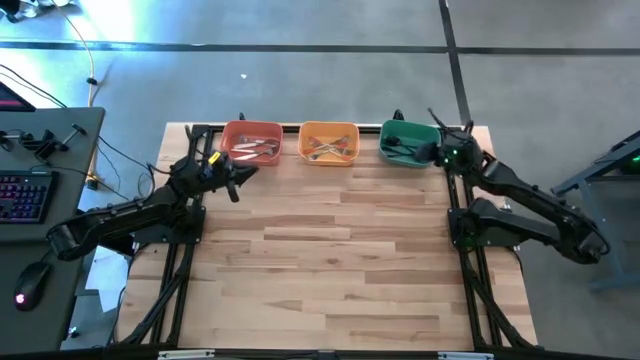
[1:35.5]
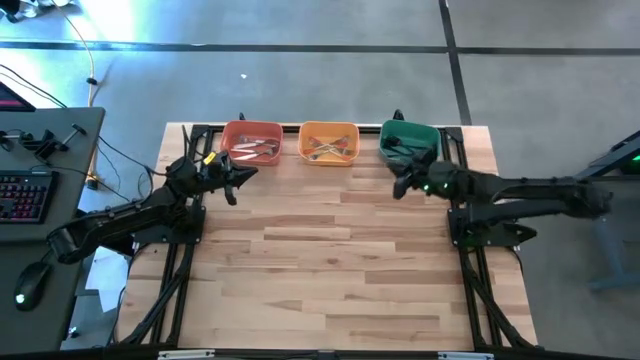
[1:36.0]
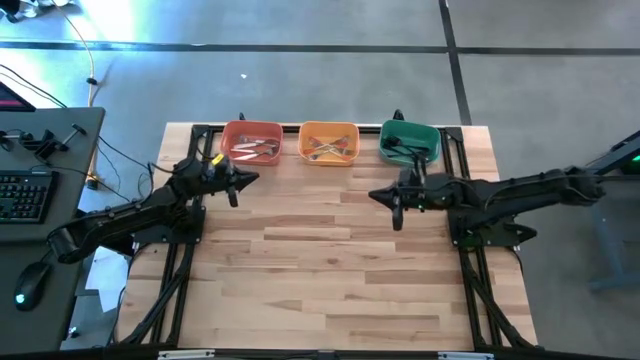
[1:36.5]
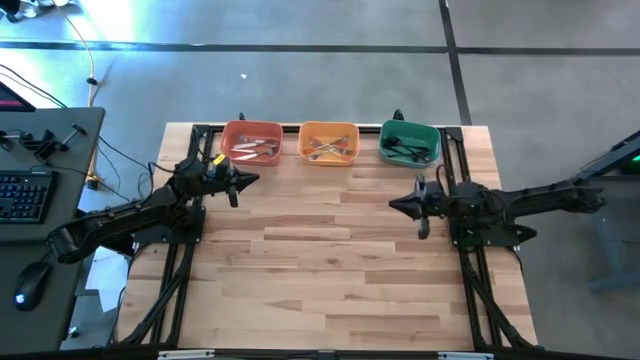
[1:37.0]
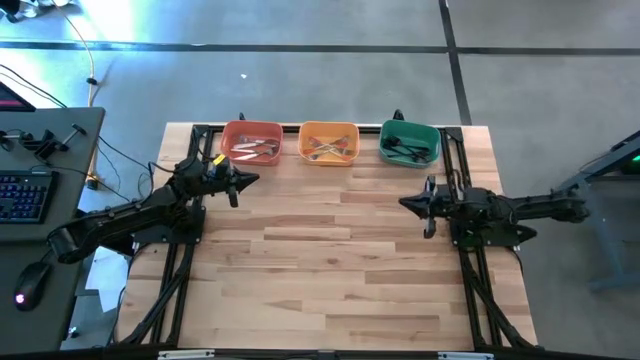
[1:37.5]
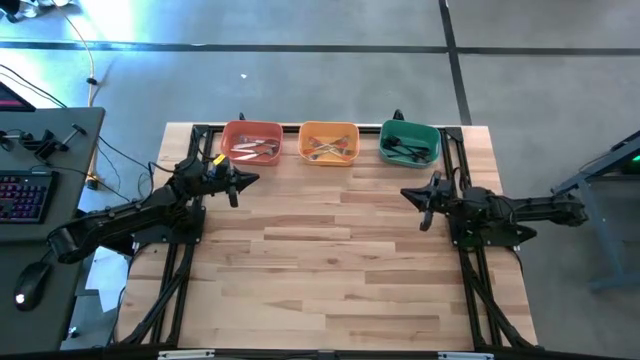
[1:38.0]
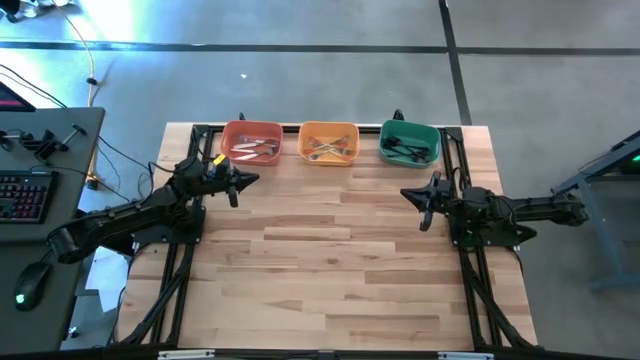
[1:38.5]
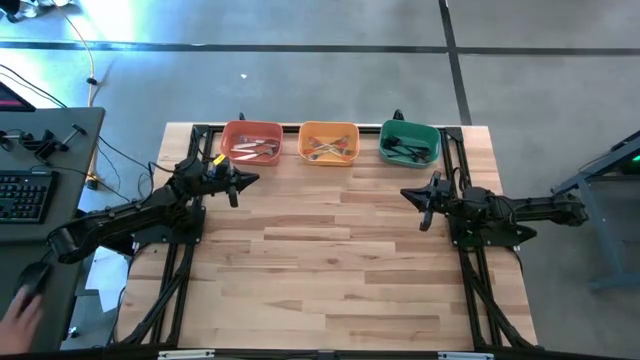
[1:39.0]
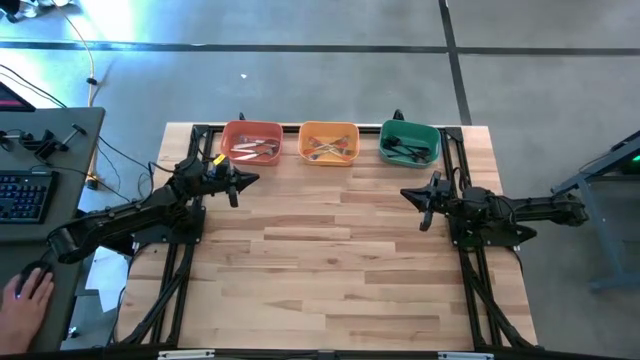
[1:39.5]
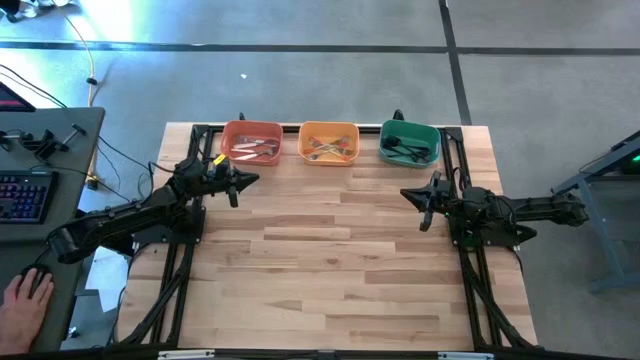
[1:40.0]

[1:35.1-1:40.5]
Task: Sort silverware by color (type)
Return to Home Position

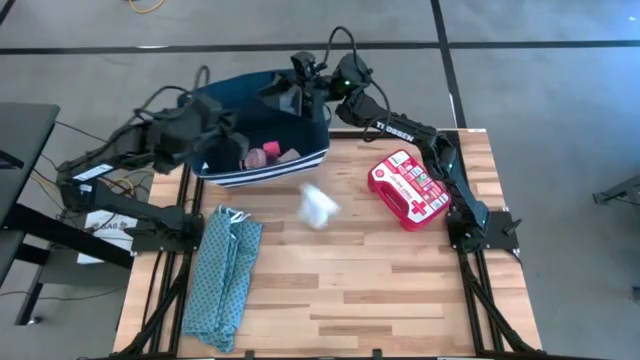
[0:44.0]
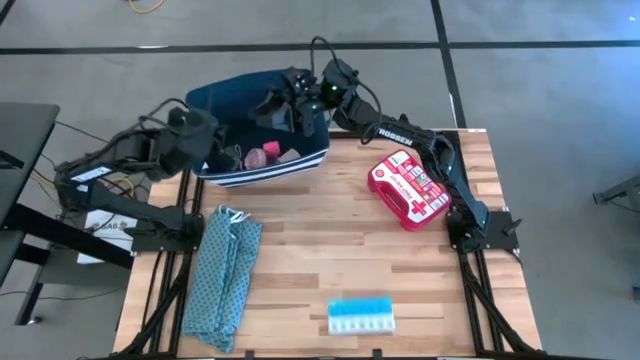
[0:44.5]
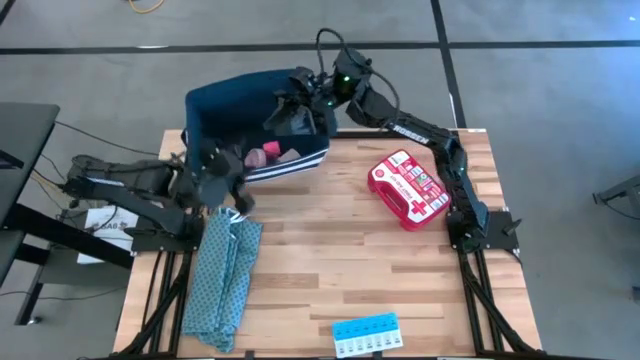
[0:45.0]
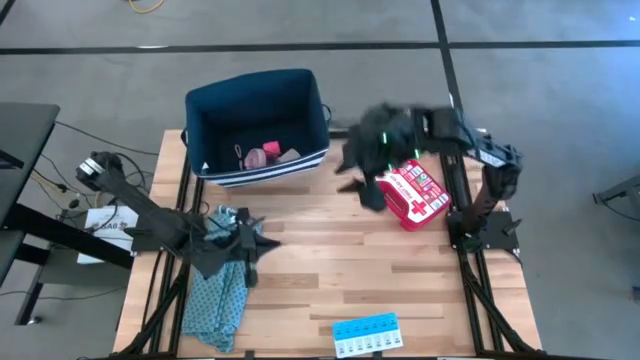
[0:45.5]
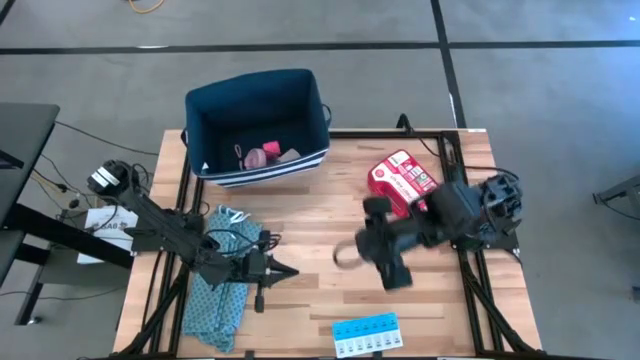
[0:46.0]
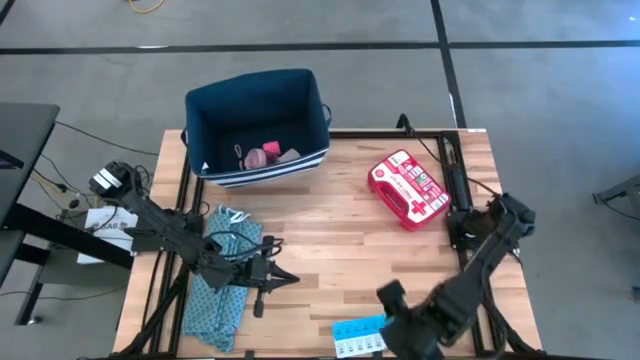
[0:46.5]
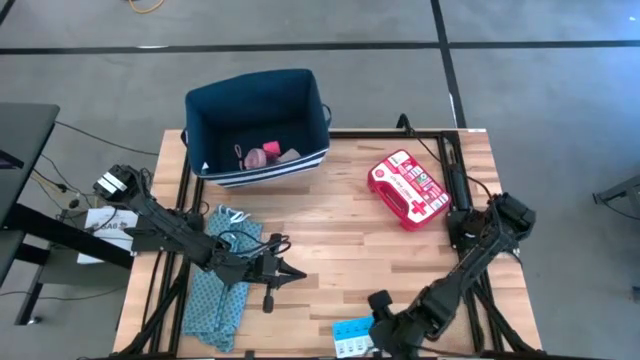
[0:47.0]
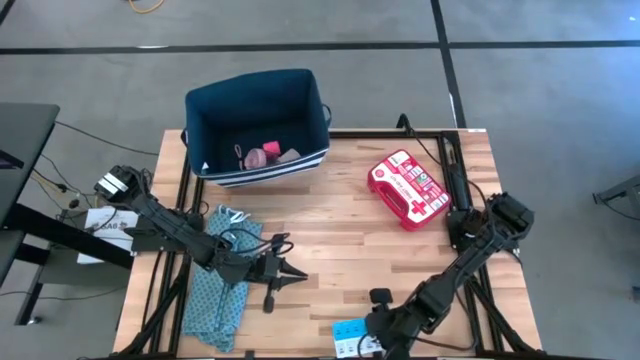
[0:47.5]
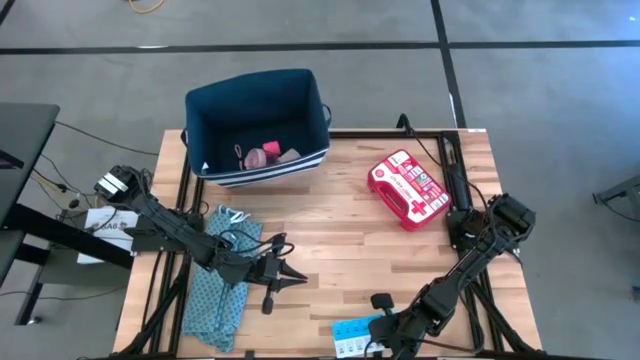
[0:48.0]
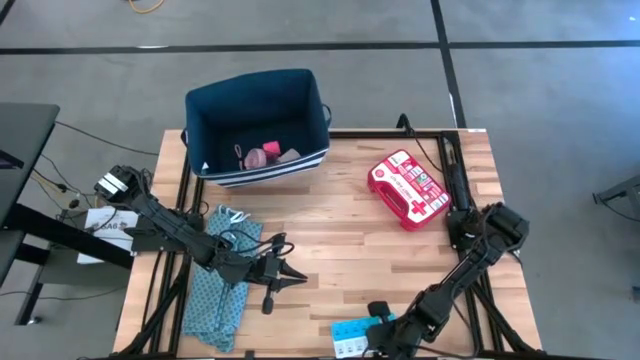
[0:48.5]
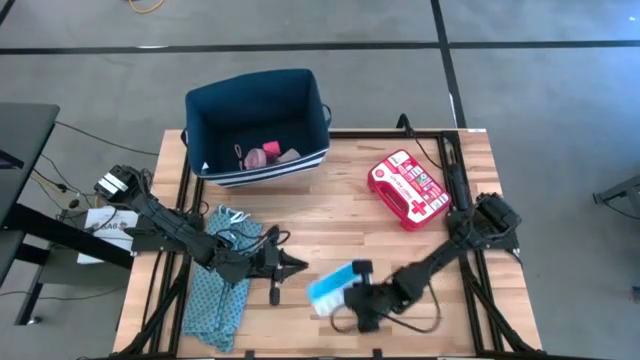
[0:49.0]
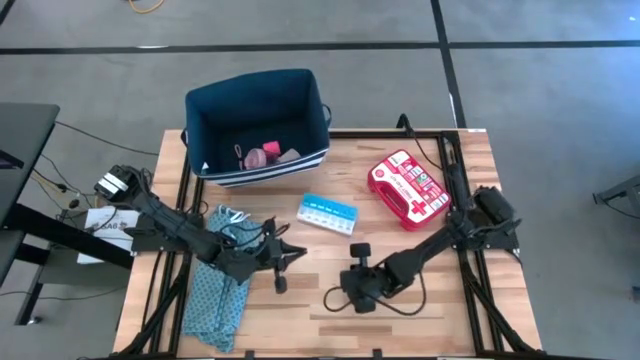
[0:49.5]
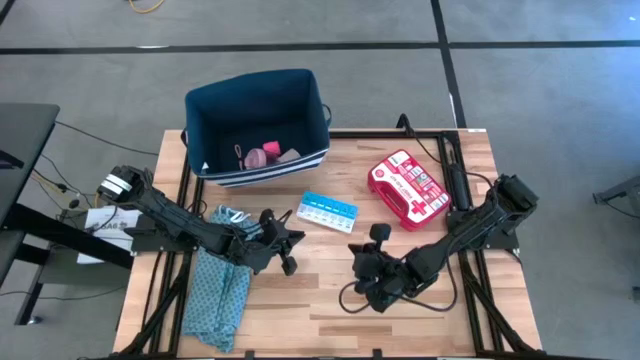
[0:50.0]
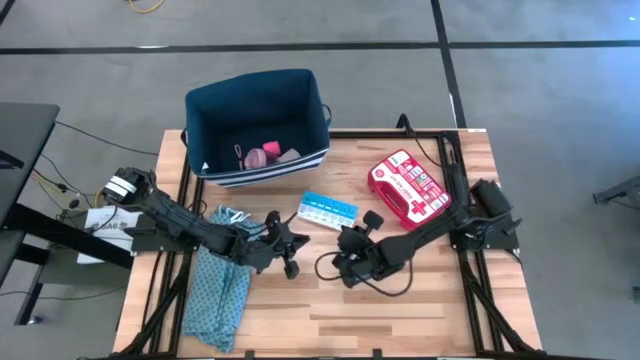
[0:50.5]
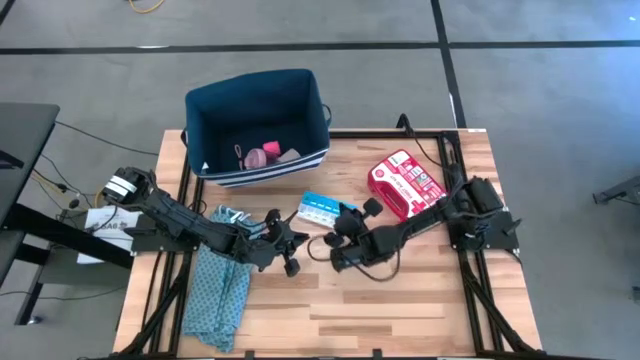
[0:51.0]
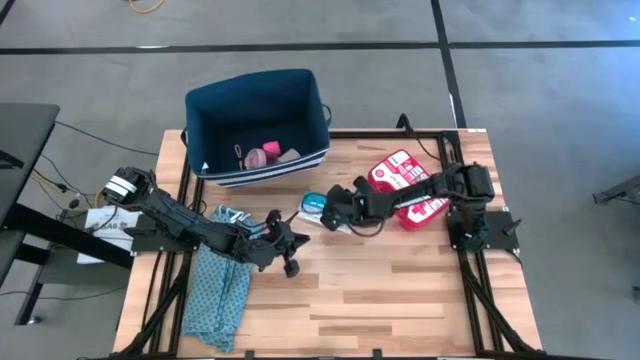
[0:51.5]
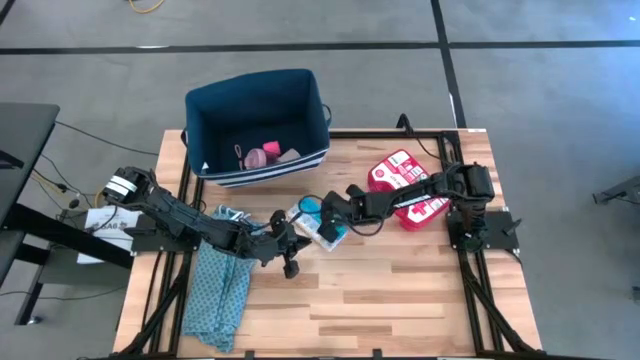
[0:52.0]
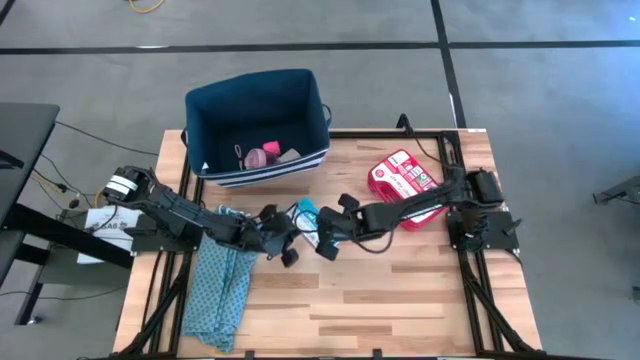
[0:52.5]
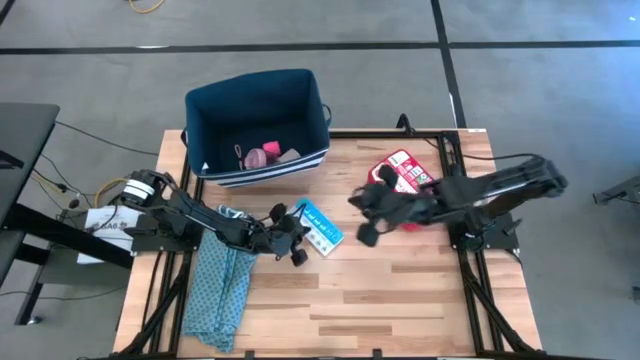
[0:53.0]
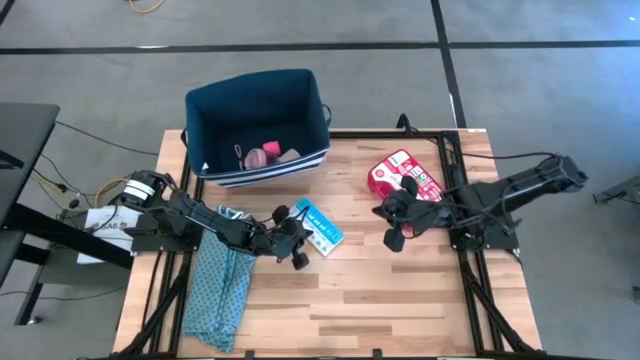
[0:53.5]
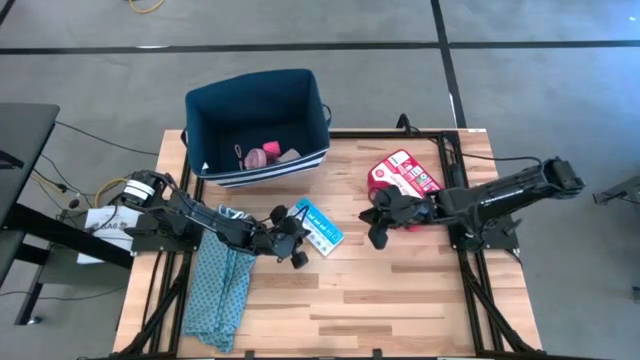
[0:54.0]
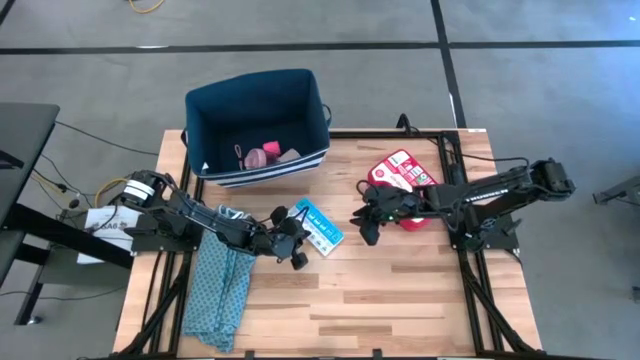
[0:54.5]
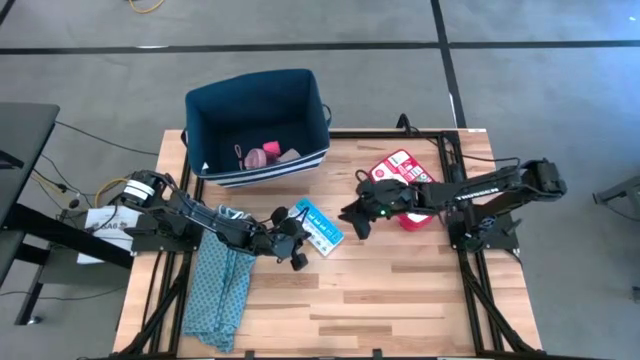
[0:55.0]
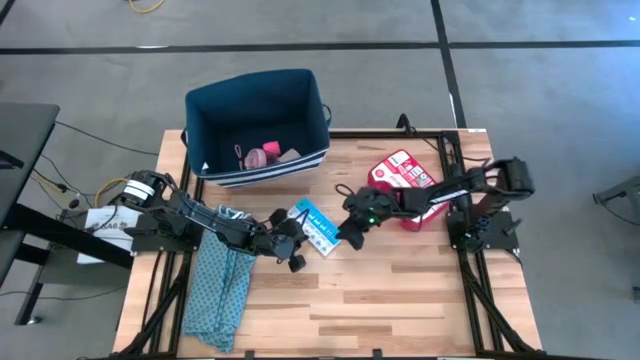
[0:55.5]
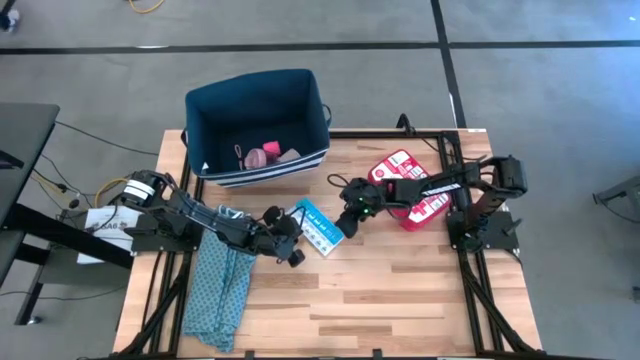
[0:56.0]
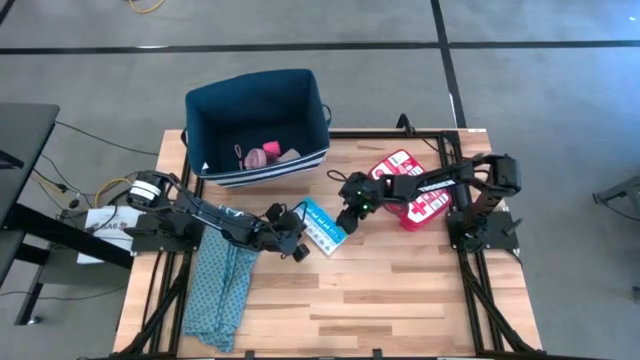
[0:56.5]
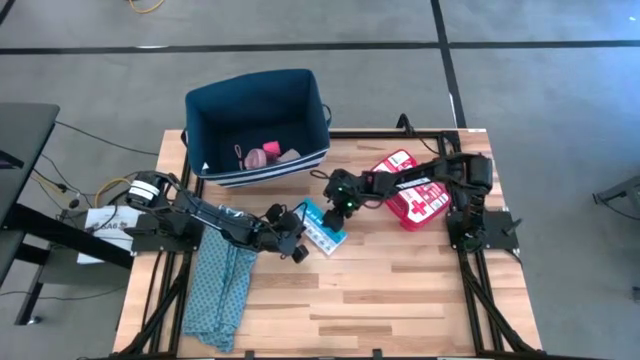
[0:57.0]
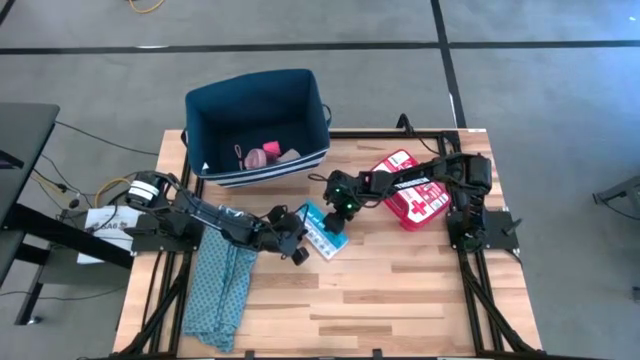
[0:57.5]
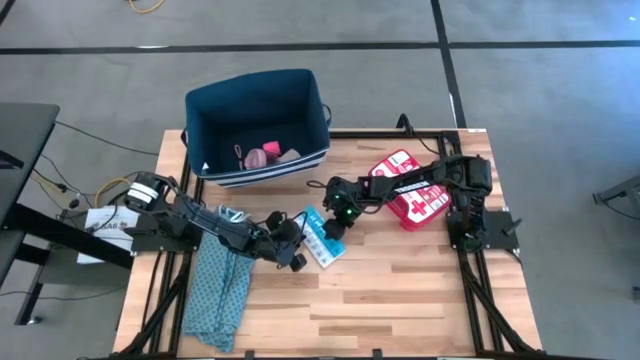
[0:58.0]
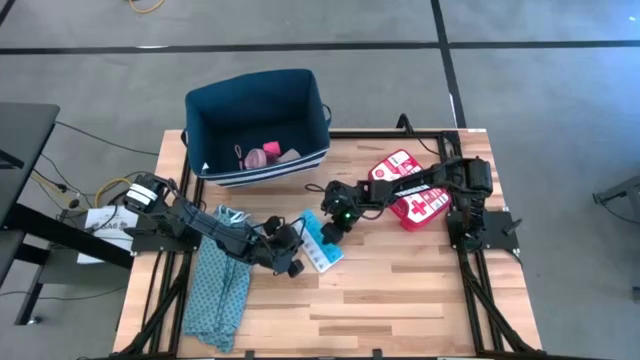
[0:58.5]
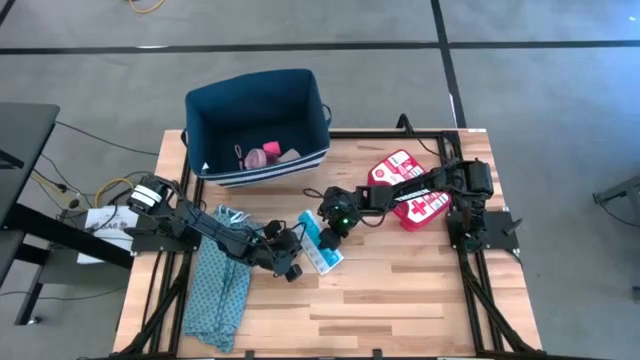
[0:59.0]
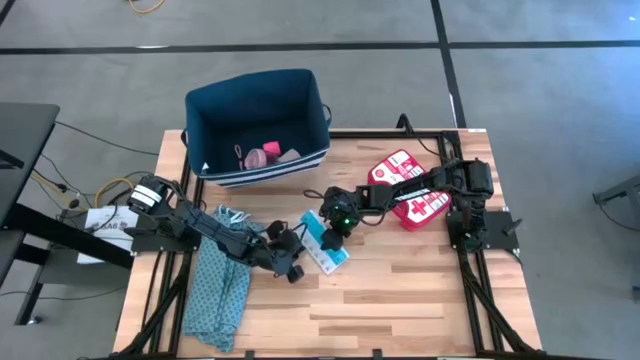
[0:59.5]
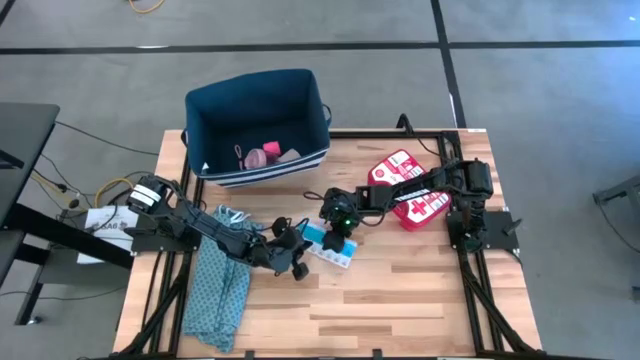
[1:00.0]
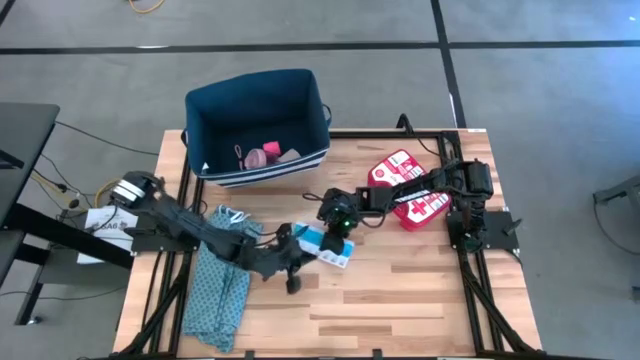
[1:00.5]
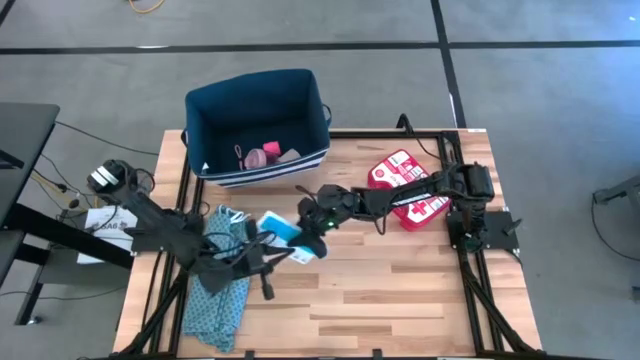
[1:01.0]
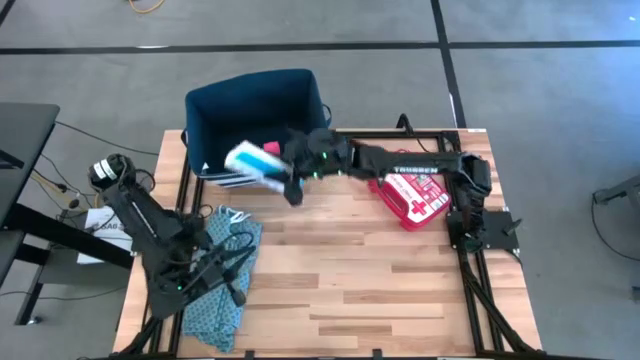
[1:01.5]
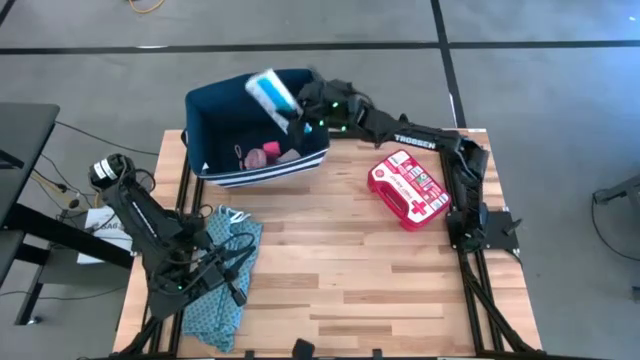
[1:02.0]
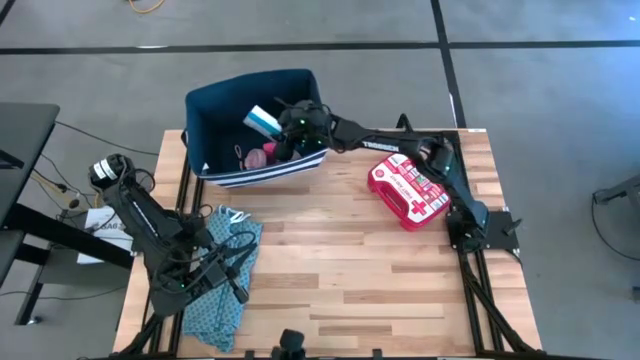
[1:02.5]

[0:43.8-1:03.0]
Task: Pick & place medical supplies in basket/bin
Put the blue white pill organizer into theblue bin
